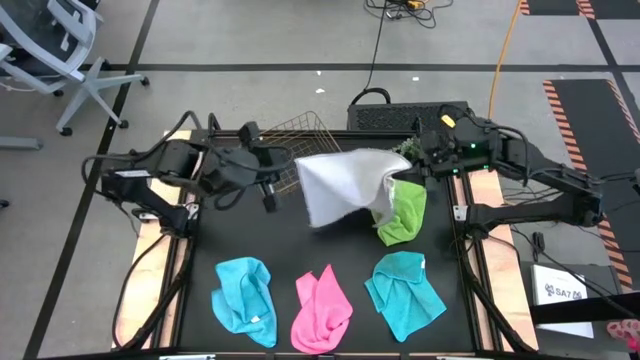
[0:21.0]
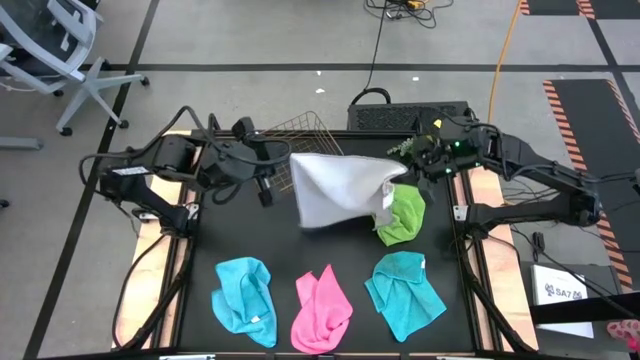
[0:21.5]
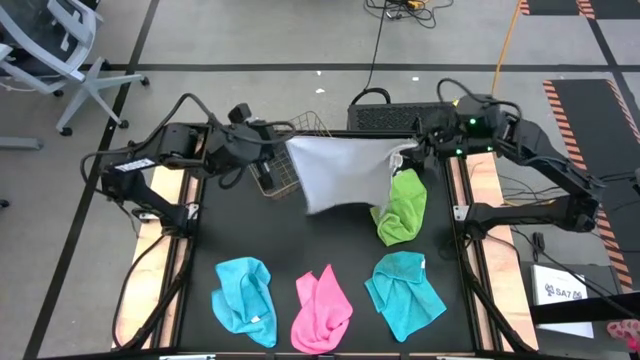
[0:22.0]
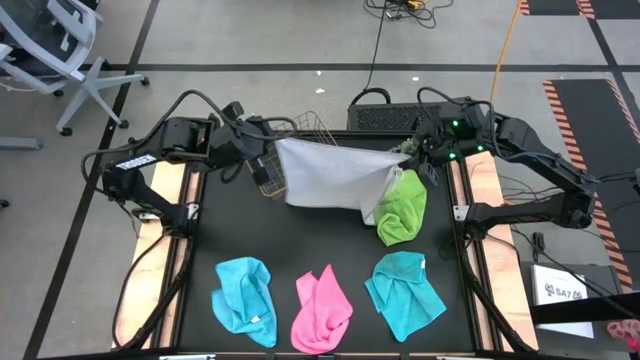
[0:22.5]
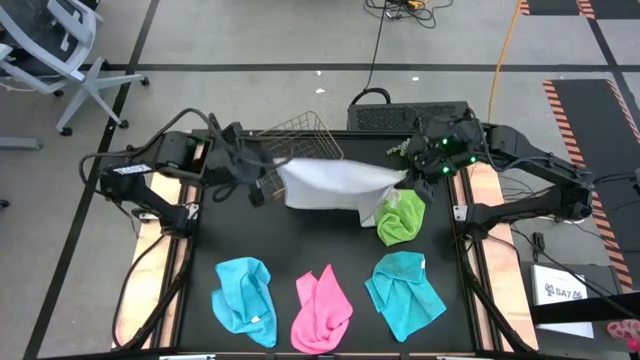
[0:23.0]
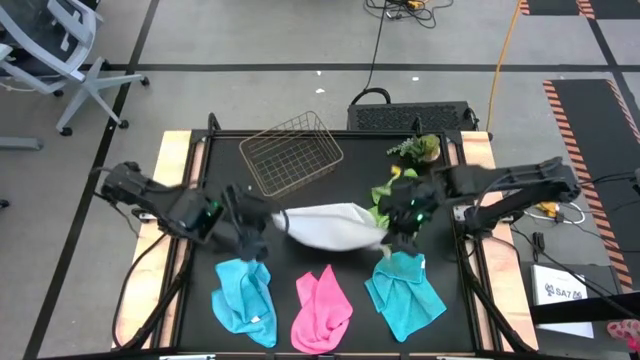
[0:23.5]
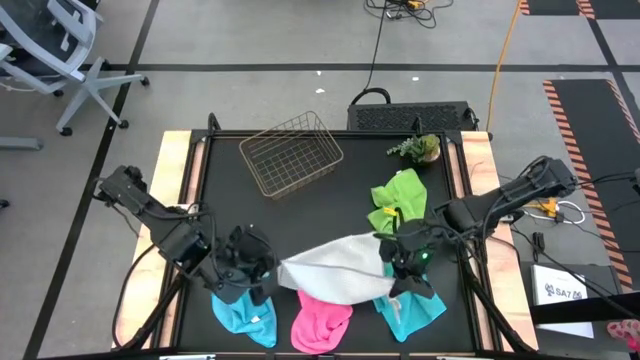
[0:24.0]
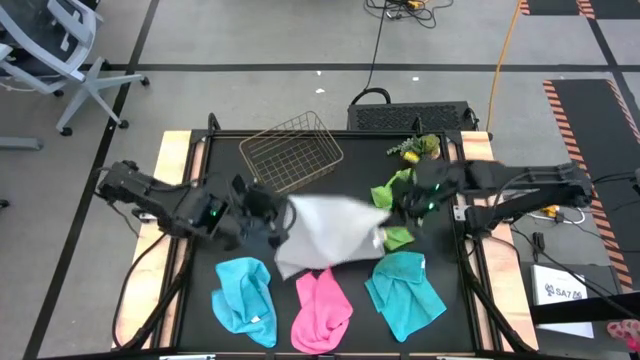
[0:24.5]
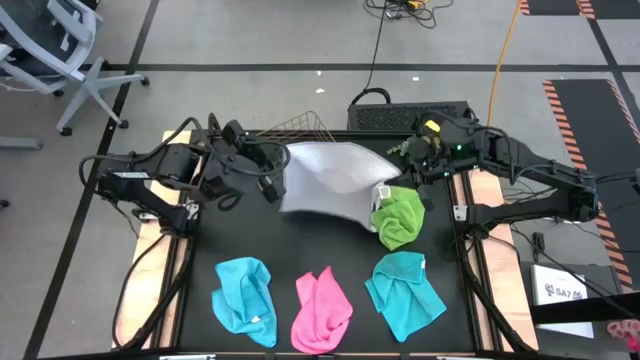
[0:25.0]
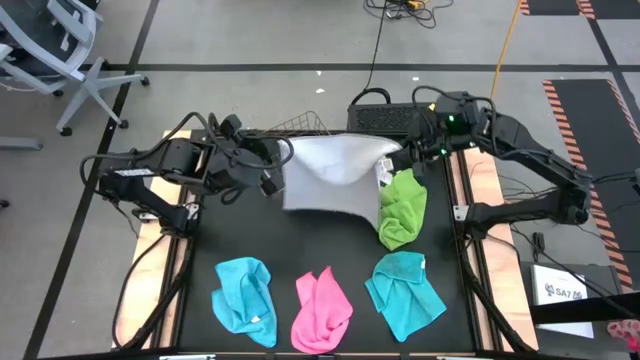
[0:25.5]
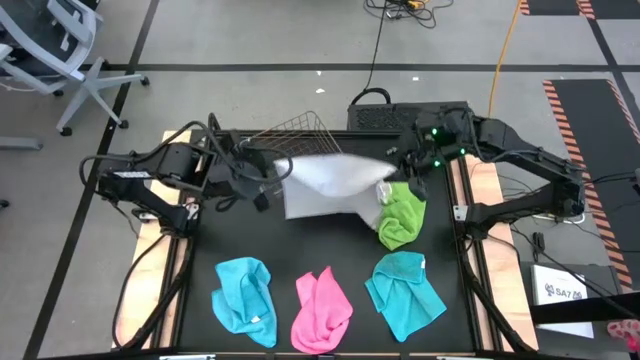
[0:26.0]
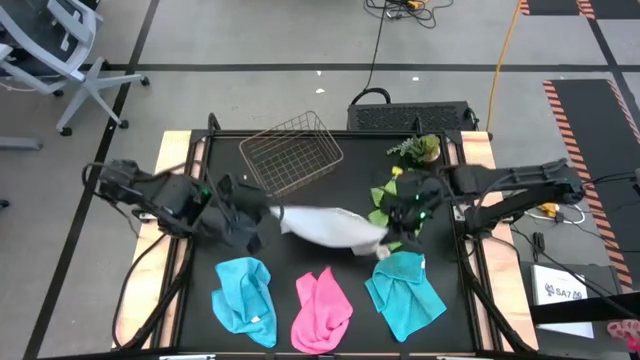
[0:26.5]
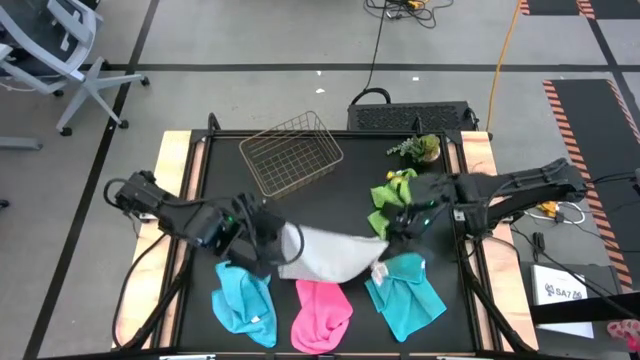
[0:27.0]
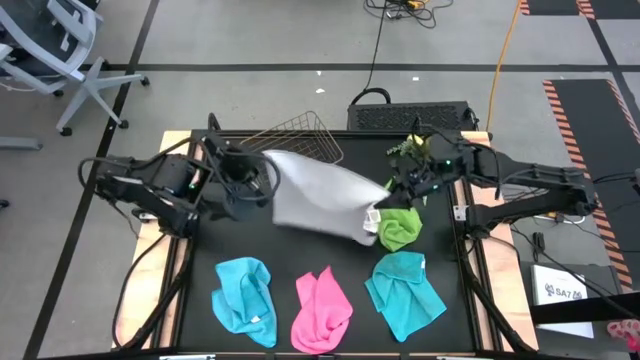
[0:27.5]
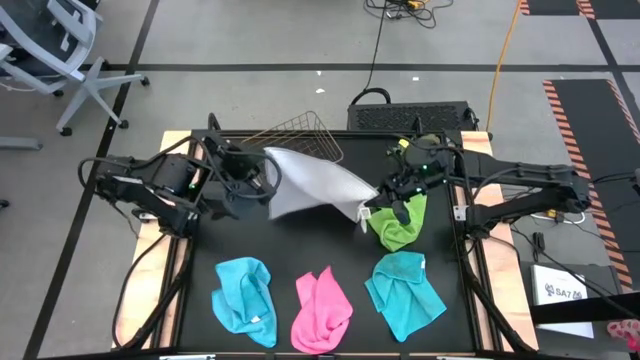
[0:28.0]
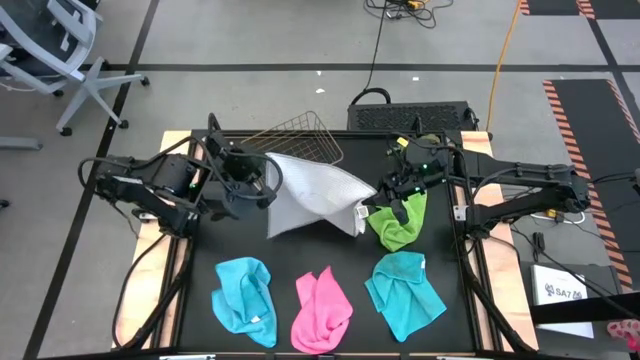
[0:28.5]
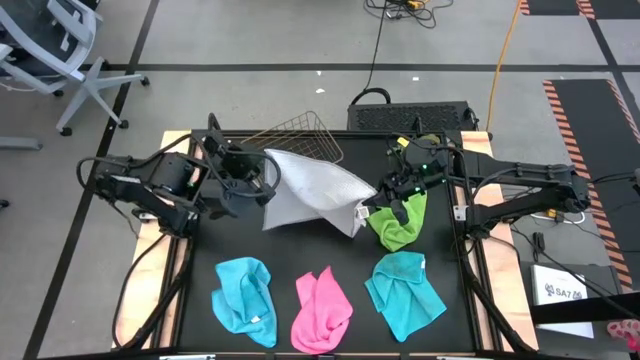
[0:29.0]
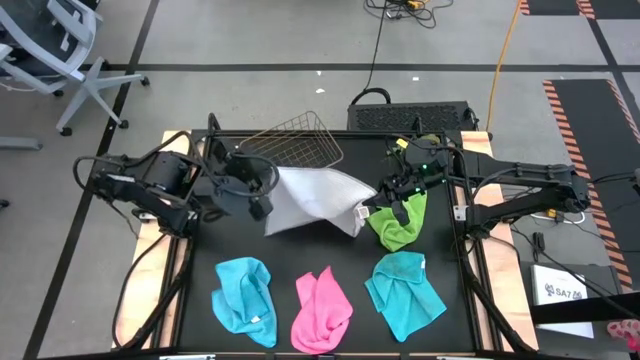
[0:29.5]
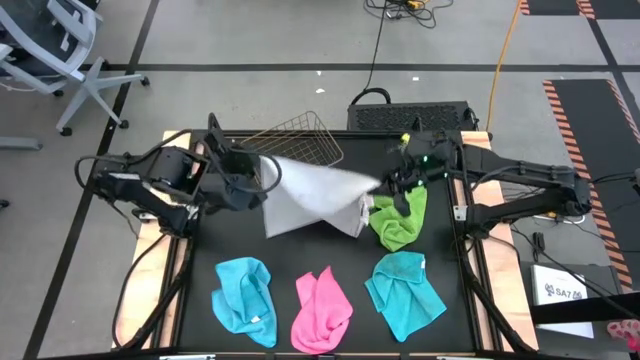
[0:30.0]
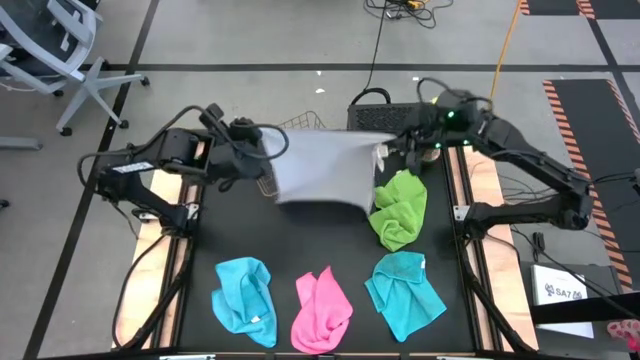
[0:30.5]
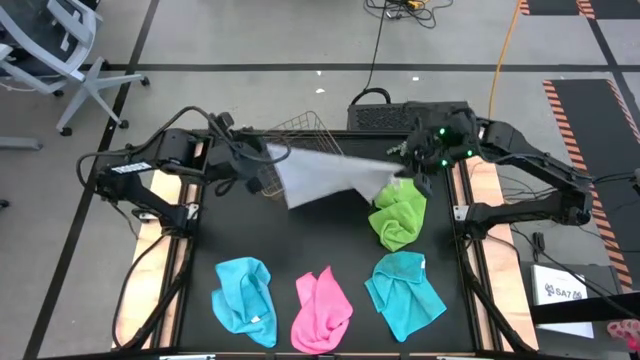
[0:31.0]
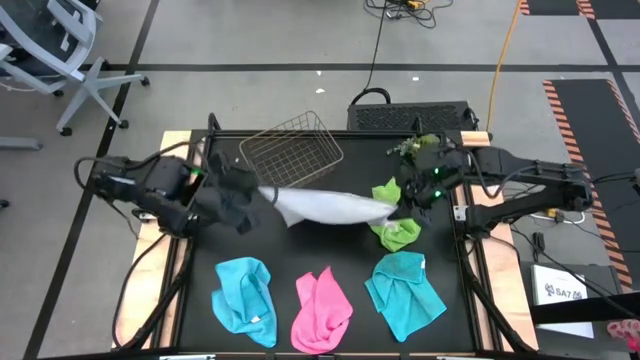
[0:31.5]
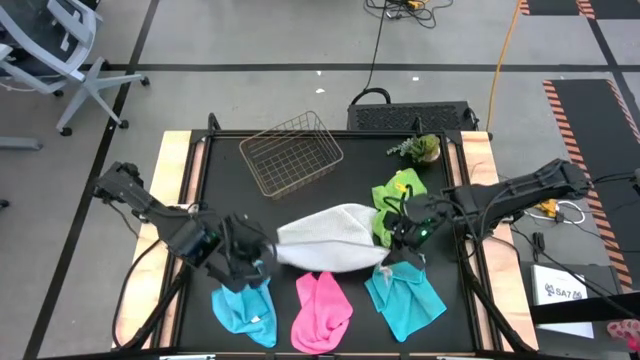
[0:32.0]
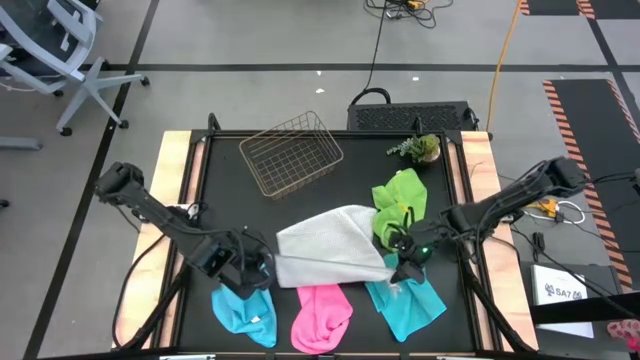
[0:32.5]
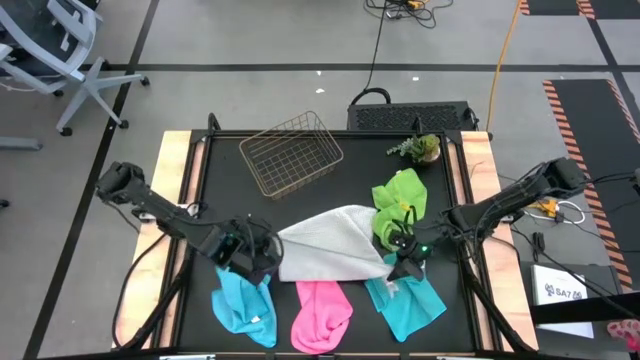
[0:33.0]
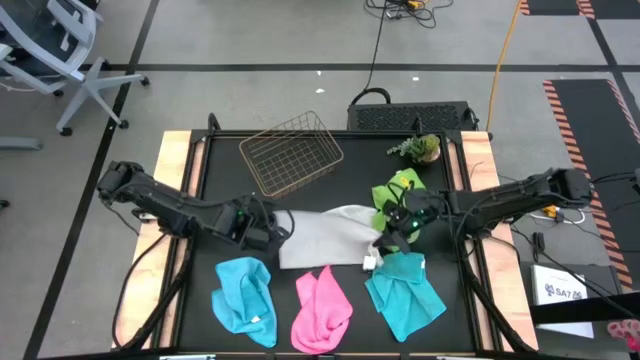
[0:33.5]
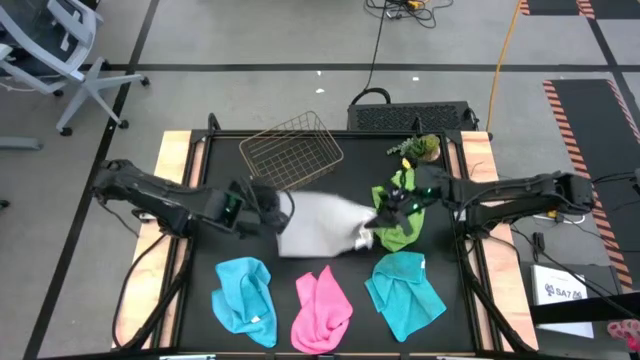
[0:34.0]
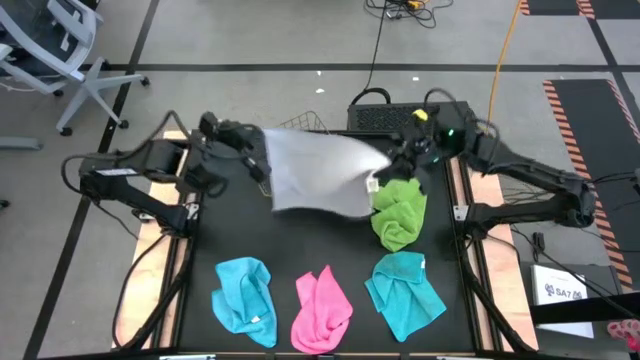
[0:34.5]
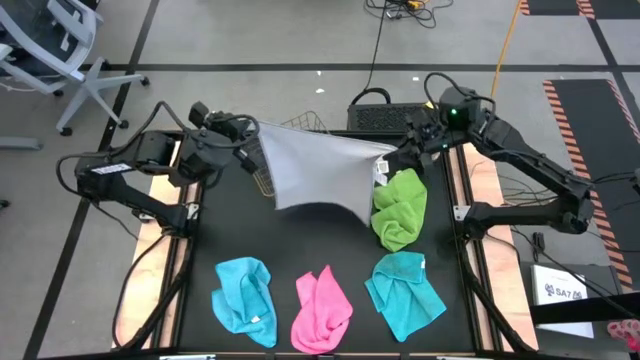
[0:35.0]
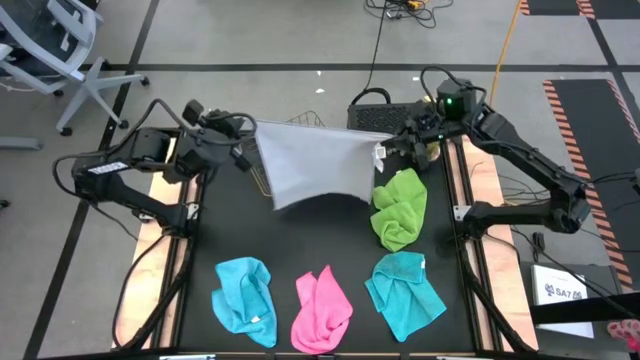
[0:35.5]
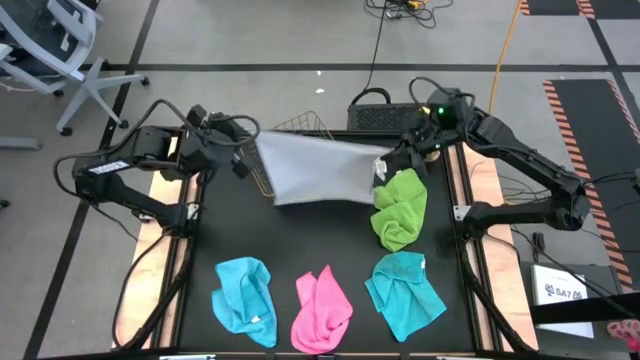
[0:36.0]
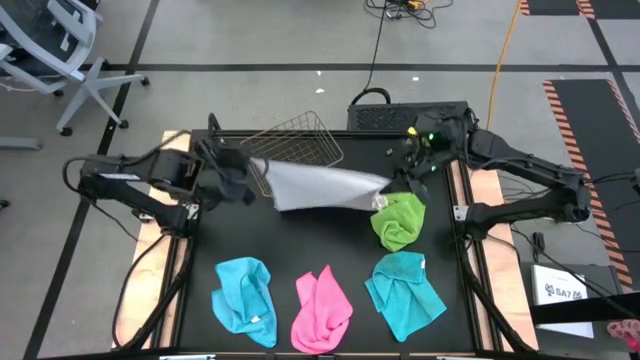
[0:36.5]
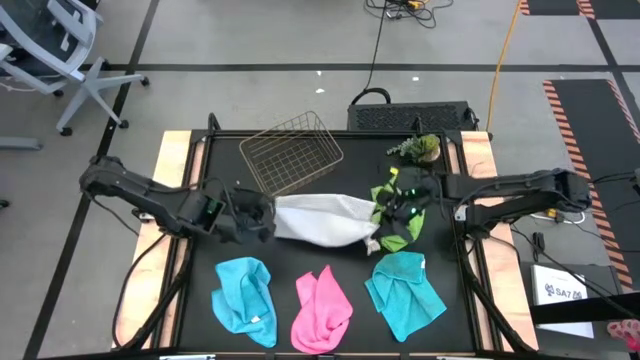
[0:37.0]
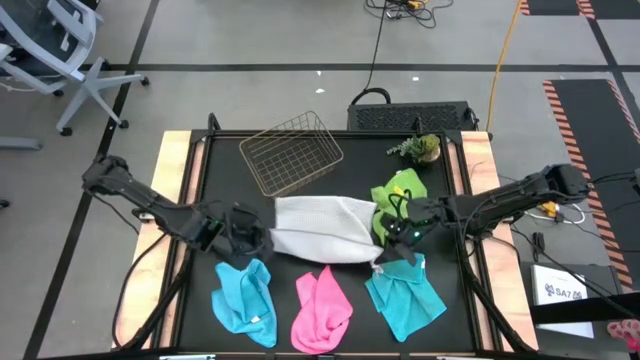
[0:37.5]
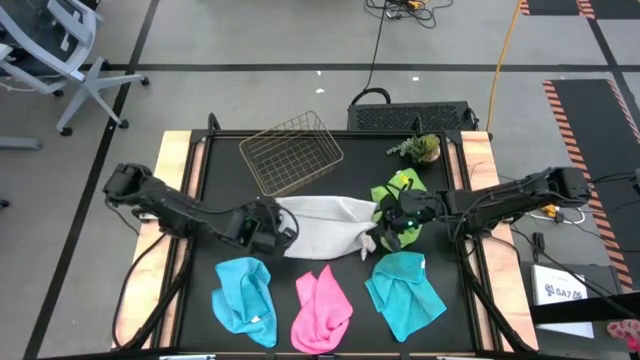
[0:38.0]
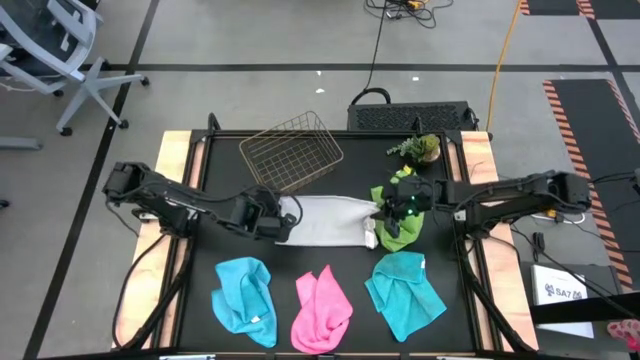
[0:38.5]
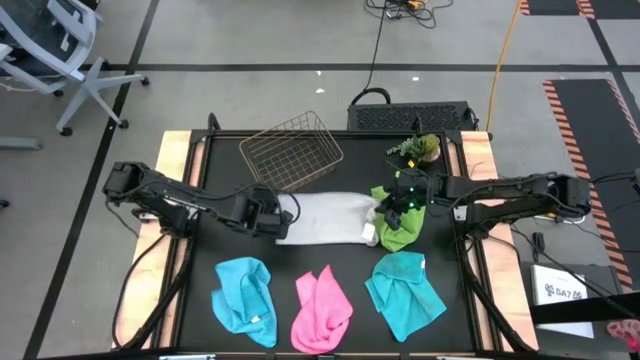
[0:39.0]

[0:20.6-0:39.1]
Task: Fold microfiber towels
Fold the gray microfiber cloth

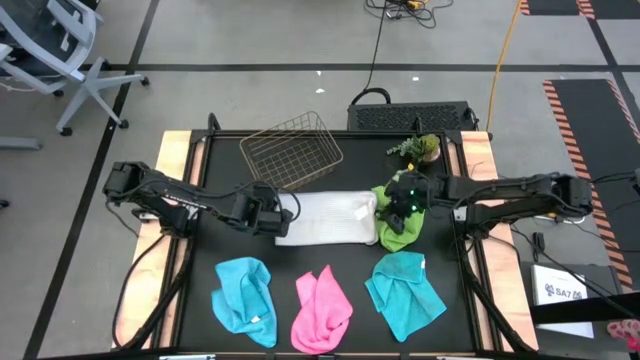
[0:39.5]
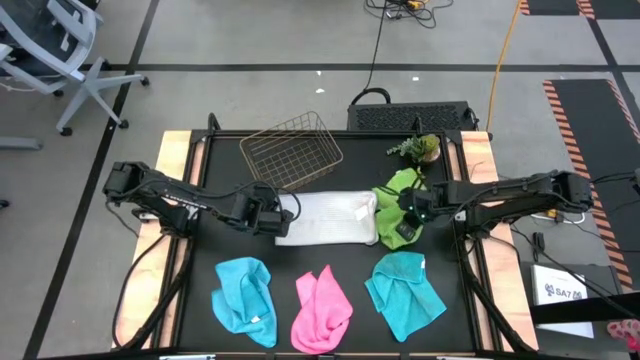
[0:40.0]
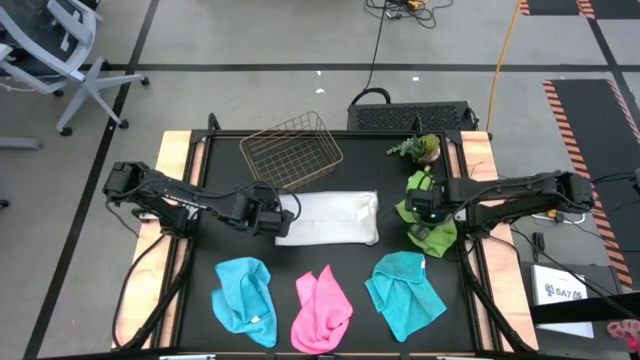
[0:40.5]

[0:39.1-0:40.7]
Adjust the green microfiber cloth

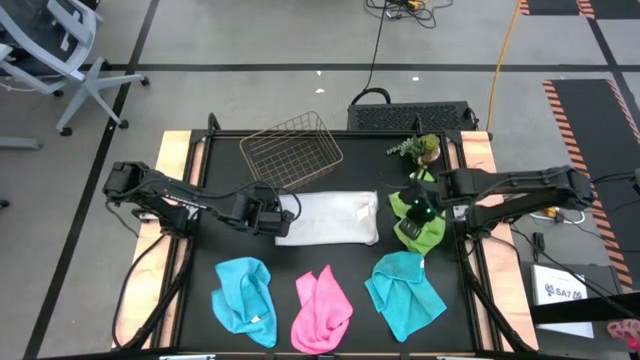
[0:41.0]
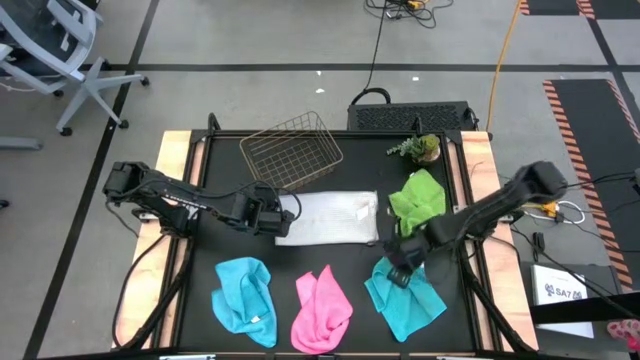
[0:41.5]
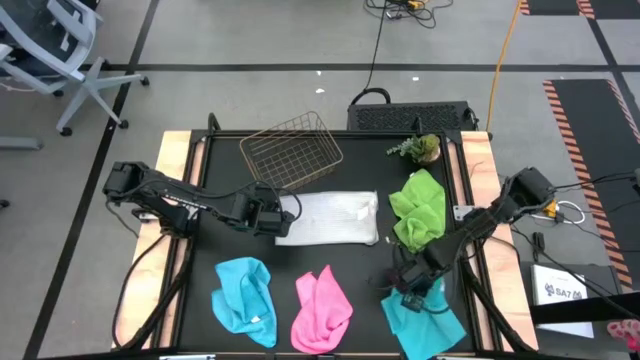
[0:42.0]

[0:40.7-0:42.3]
Adjust the right blue microfiber cloth

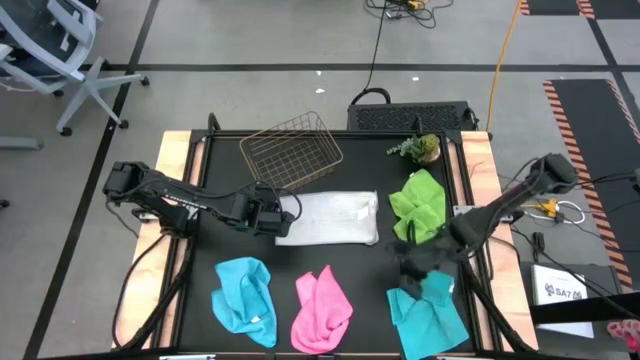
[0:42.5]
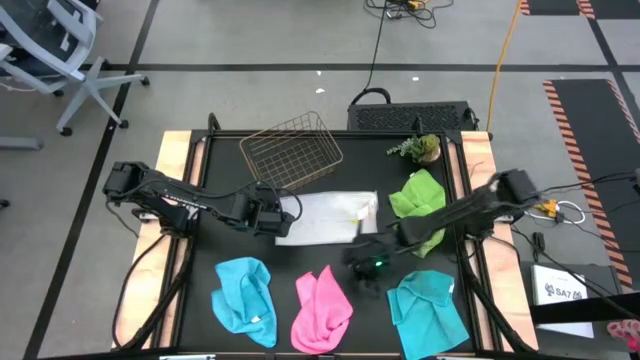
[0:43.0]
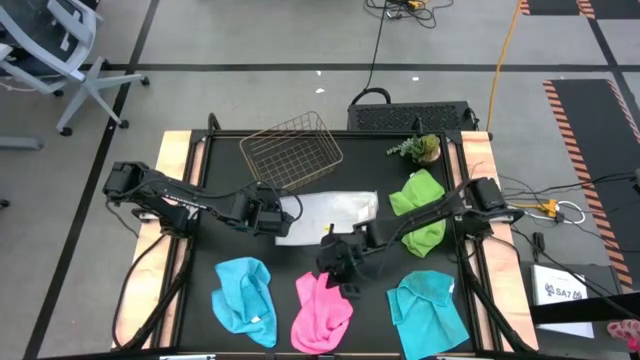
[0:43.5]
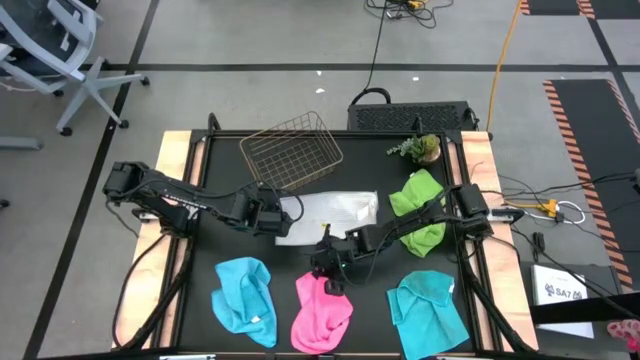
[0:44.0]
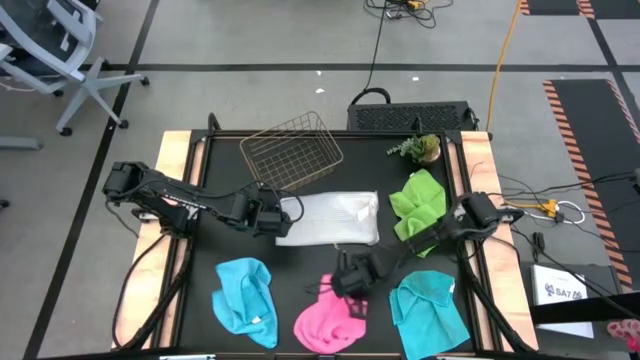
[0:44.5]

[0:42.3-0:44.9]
Adjust the pink microfiber cloth
